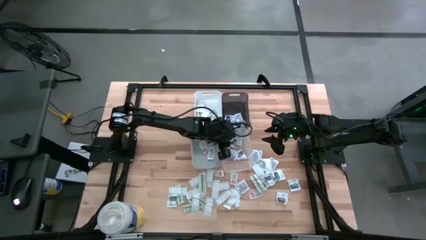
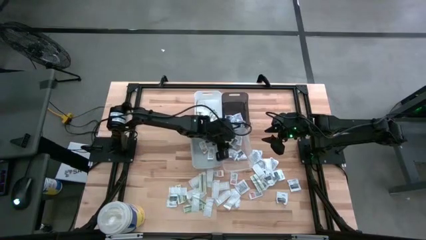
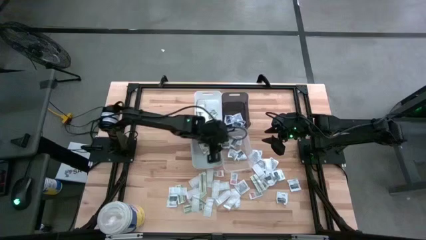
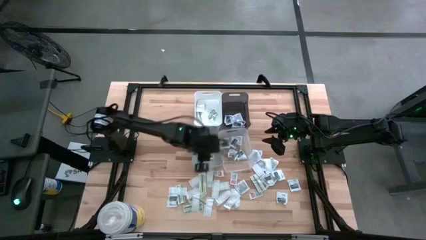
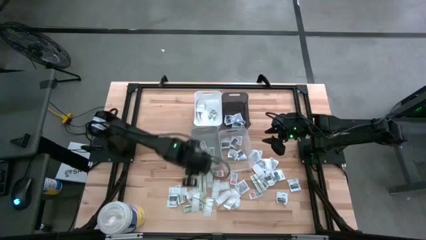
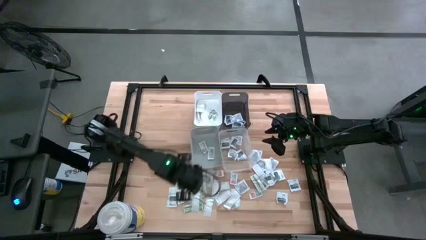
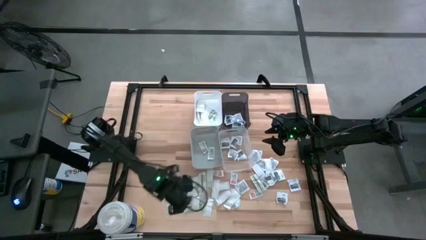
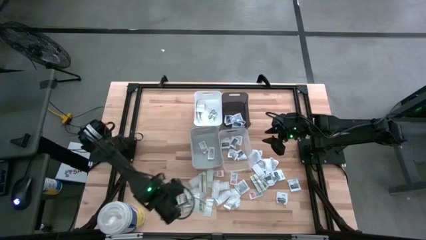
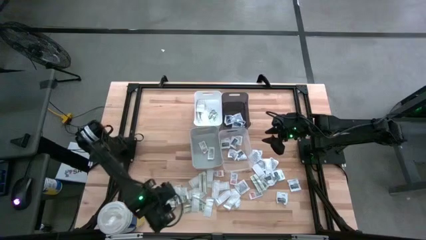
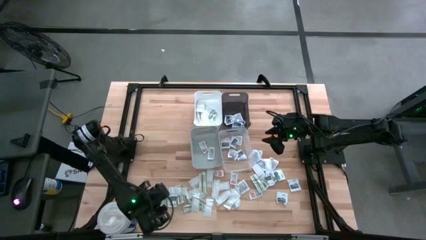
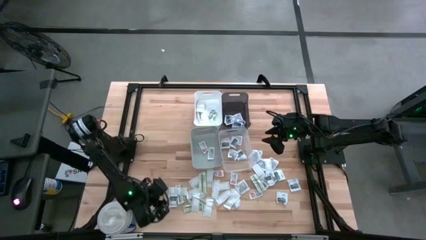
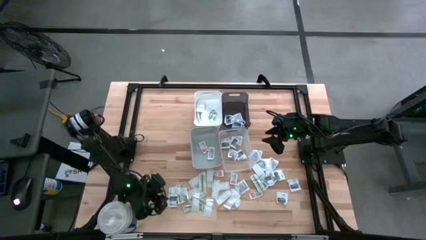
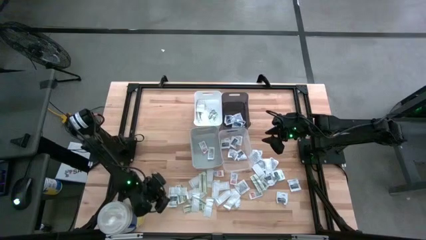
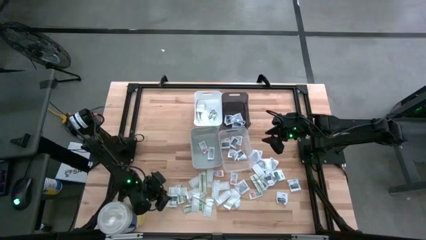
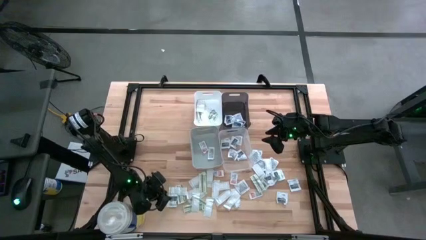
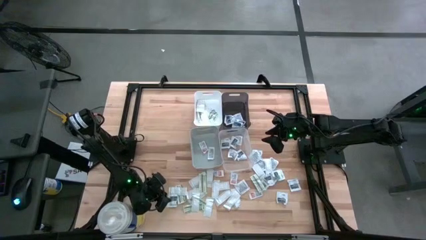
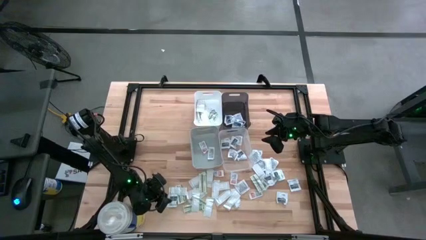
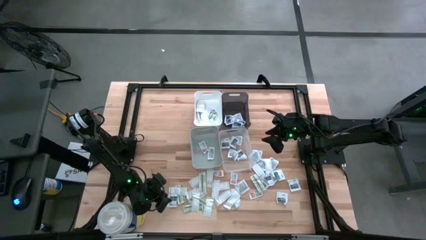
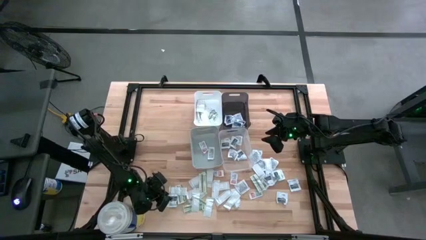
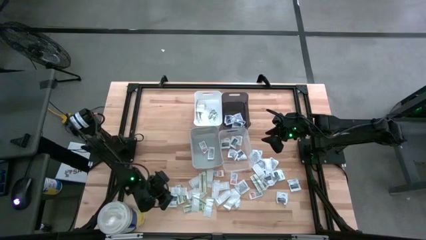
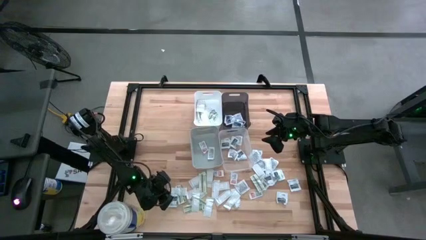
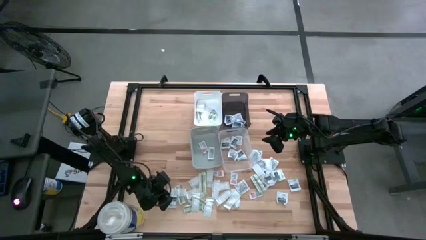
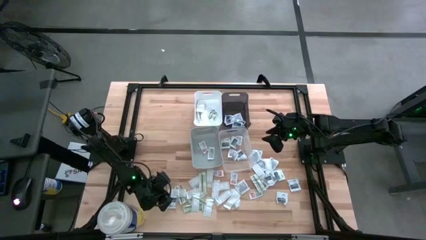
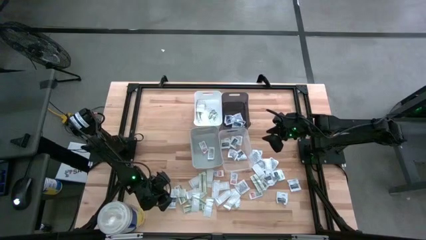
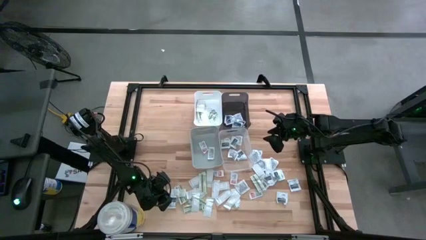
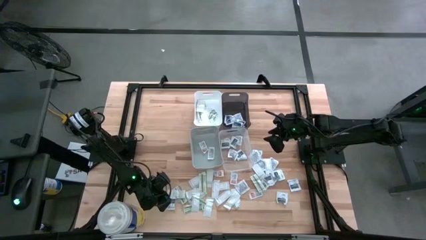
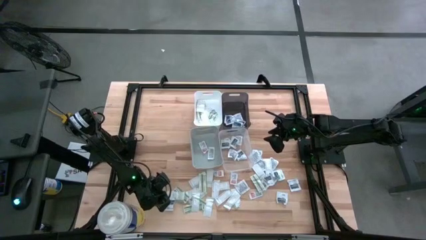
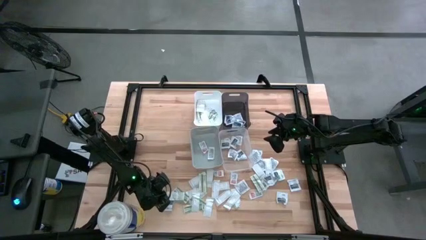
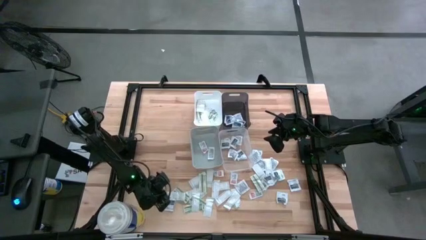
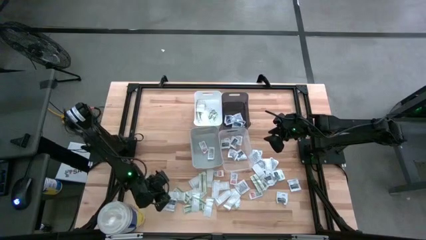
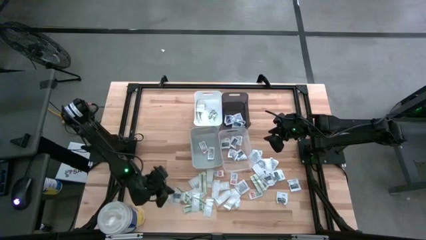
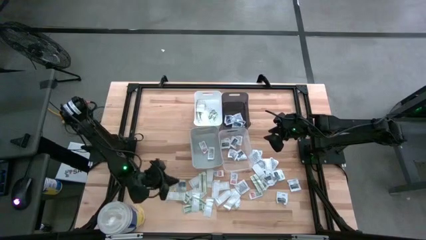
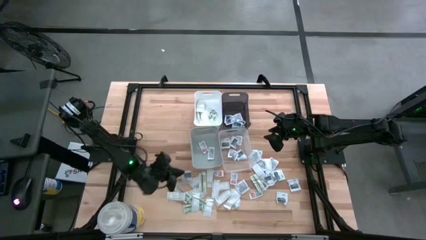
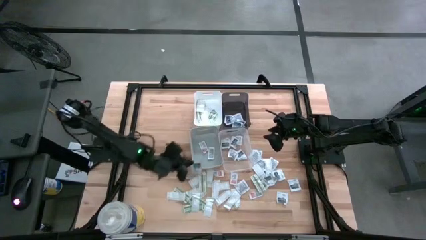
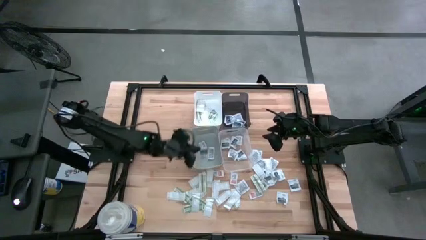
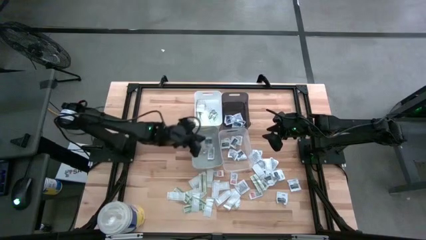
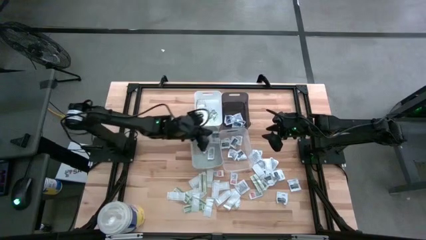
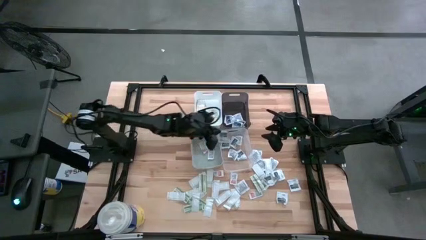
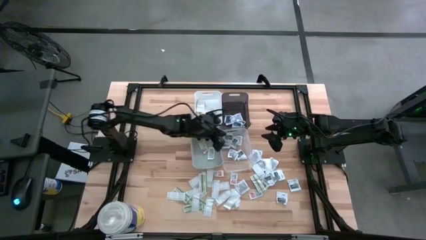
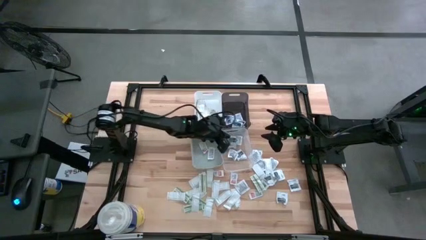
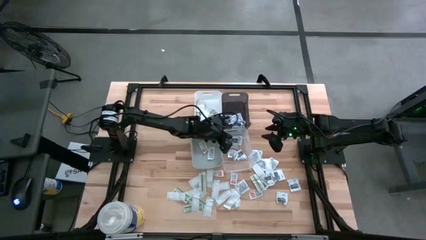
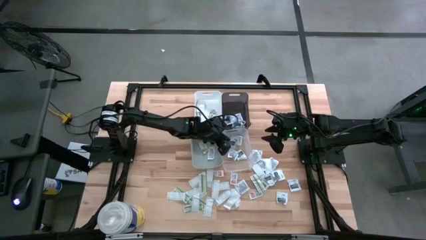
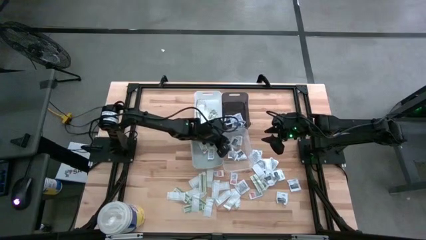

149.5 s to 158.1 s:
Task: Pick & Place First Aid Supplies
Put the gray towelette pack into the transparent bin

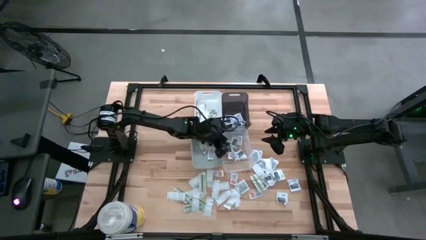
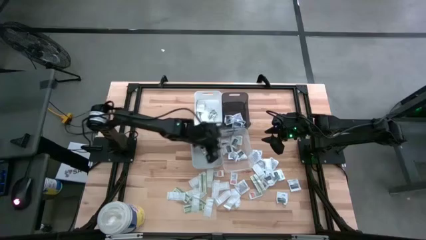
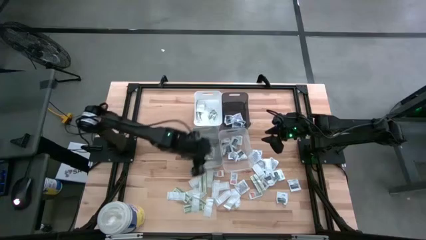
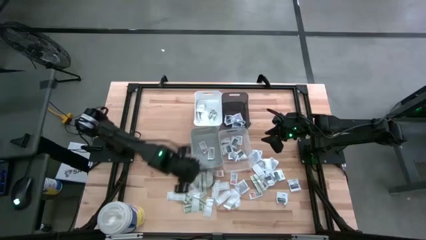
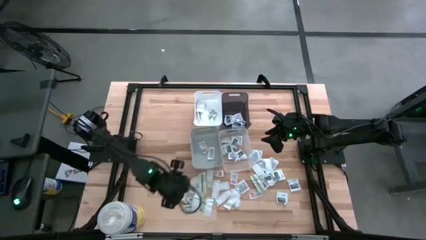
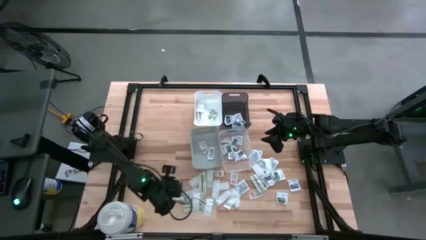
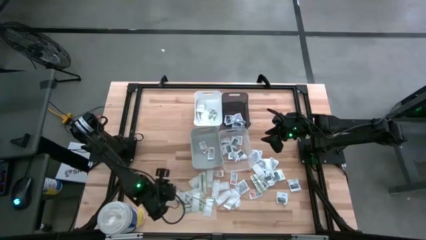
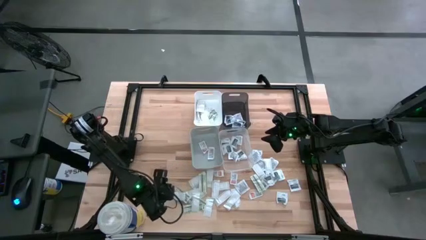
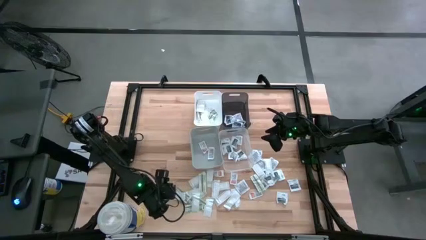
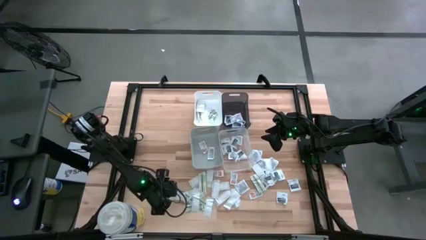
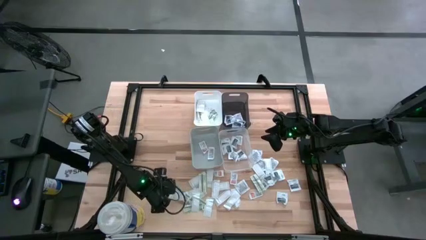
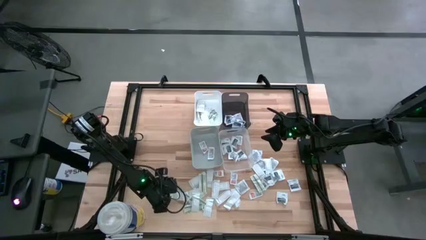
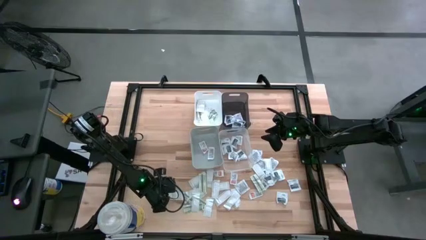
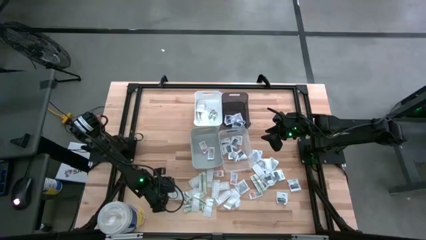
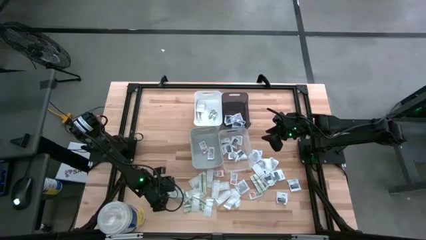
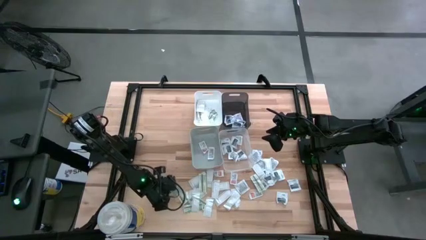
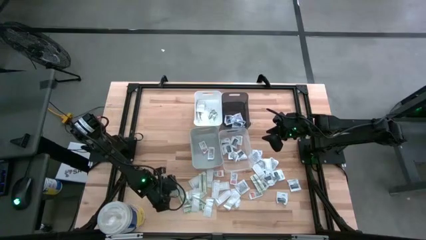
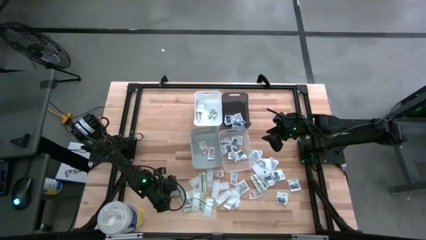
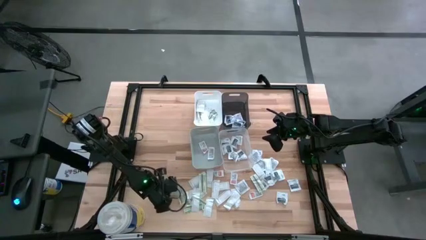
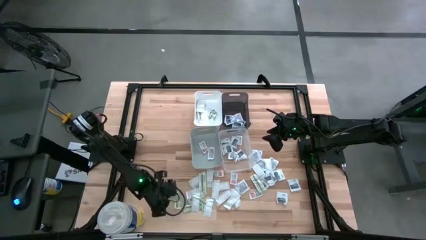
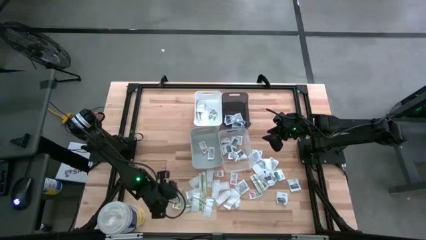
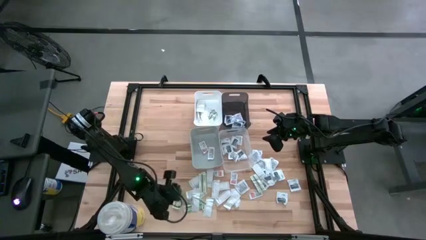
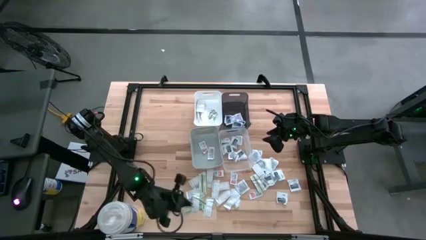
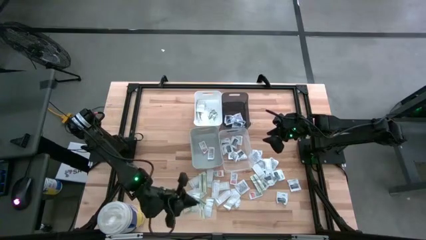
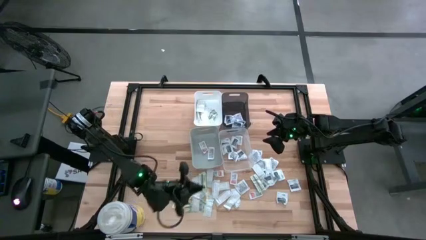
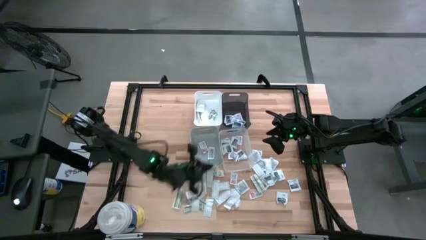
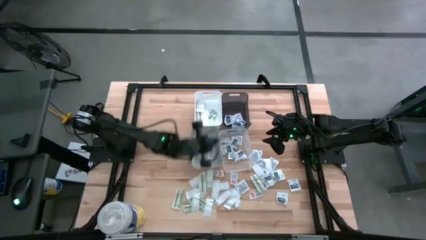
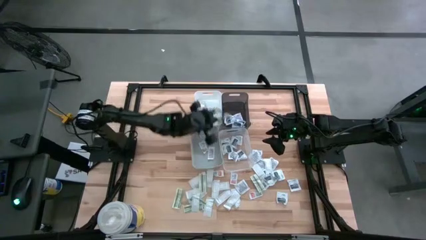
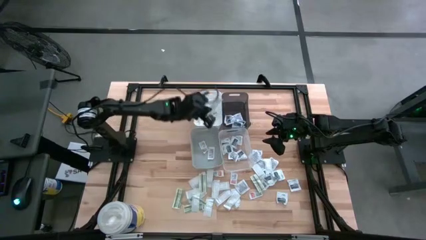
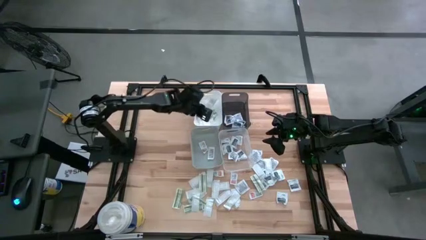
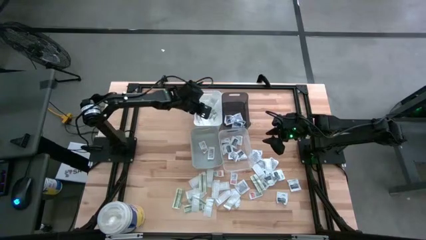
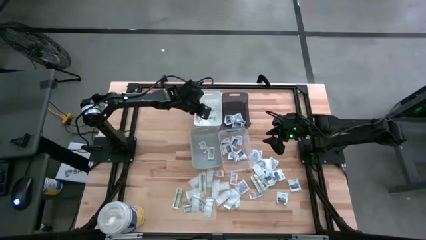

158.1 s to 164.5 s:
Put the green bandage pack into the white bin
